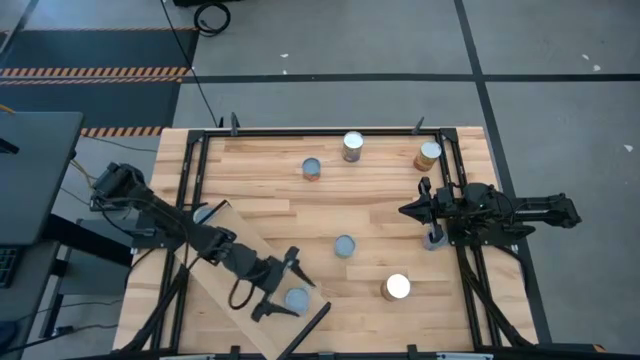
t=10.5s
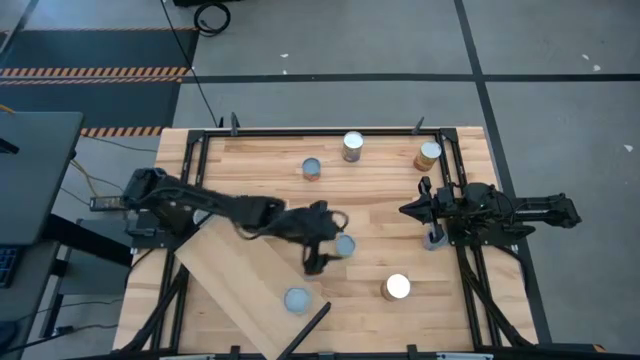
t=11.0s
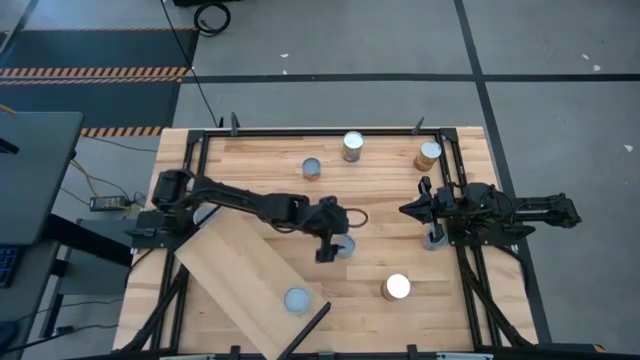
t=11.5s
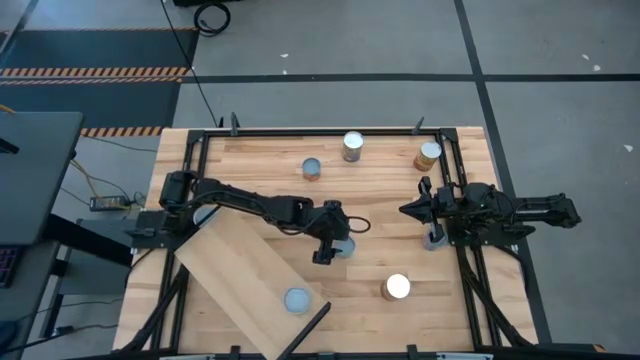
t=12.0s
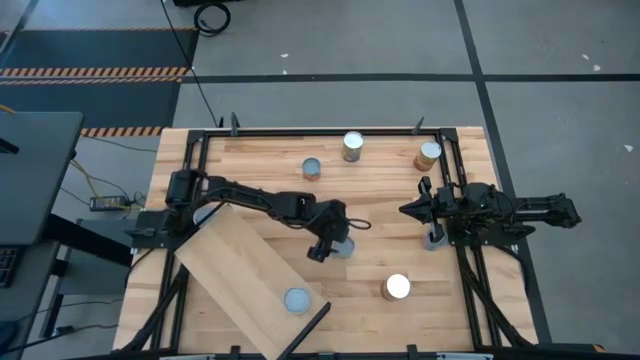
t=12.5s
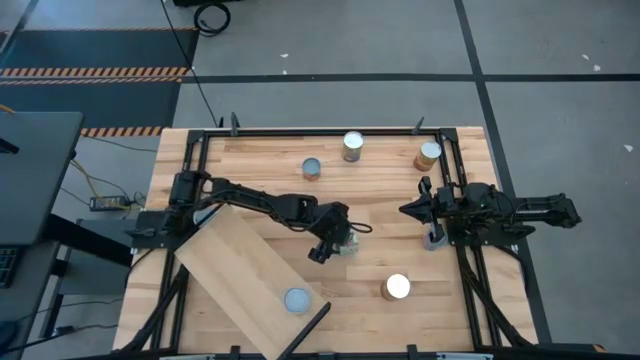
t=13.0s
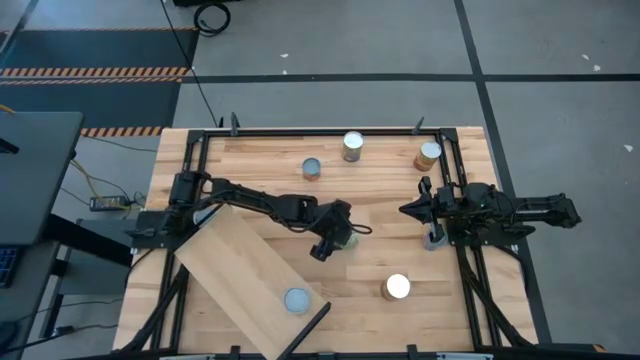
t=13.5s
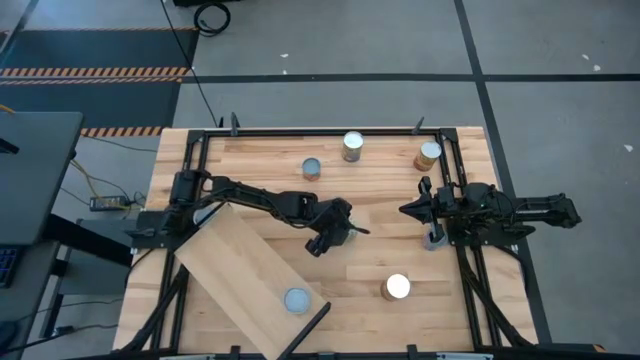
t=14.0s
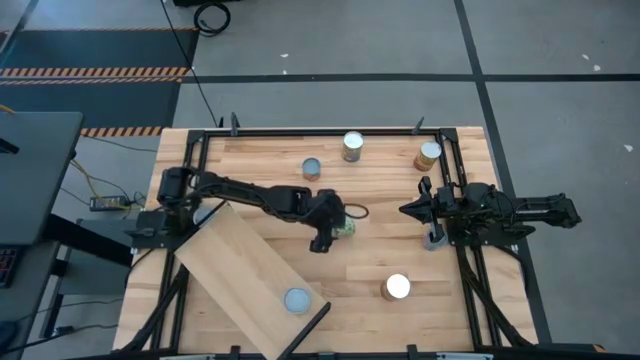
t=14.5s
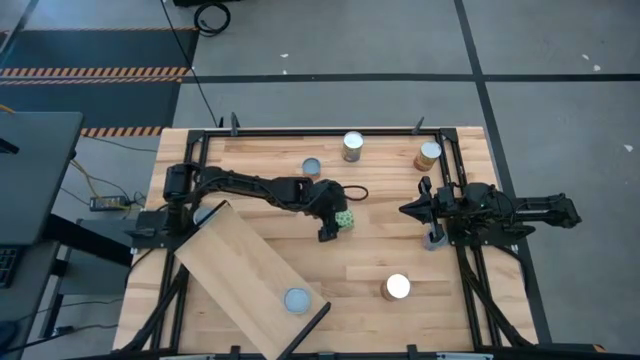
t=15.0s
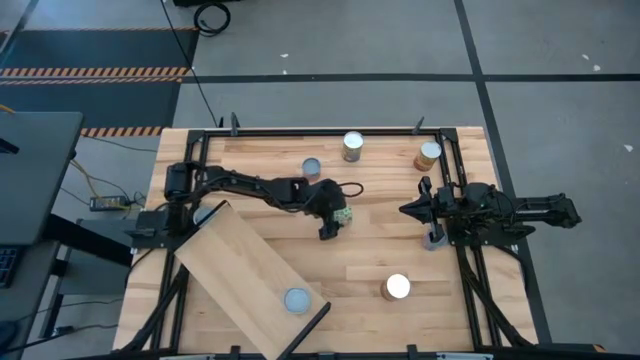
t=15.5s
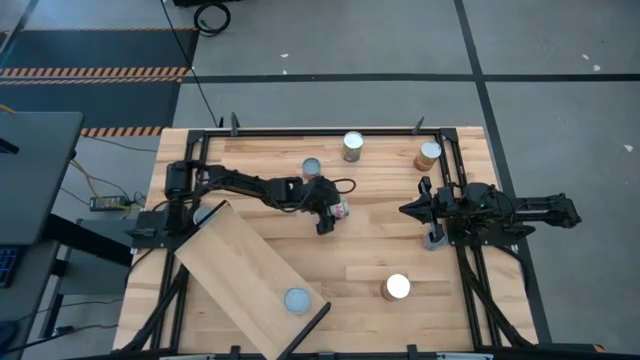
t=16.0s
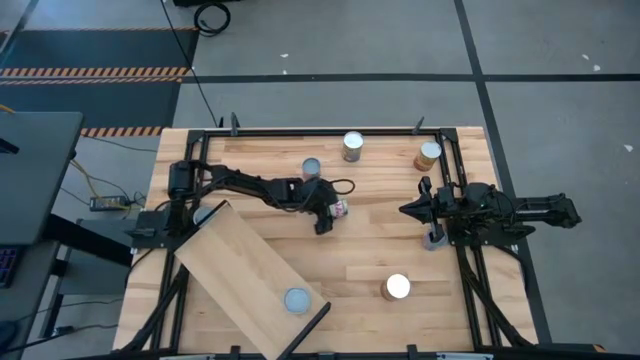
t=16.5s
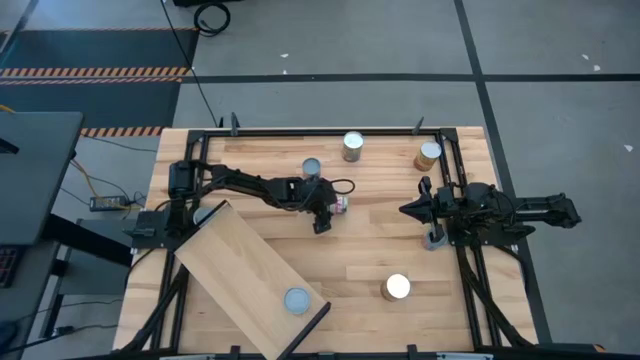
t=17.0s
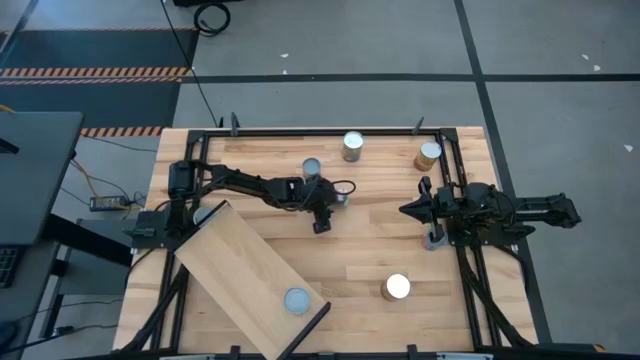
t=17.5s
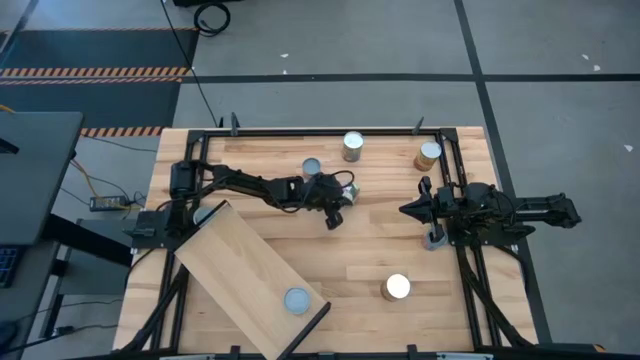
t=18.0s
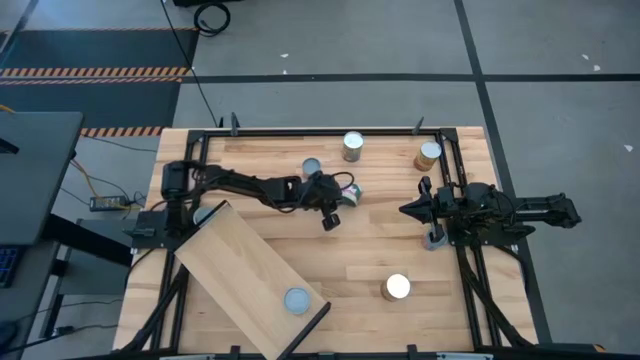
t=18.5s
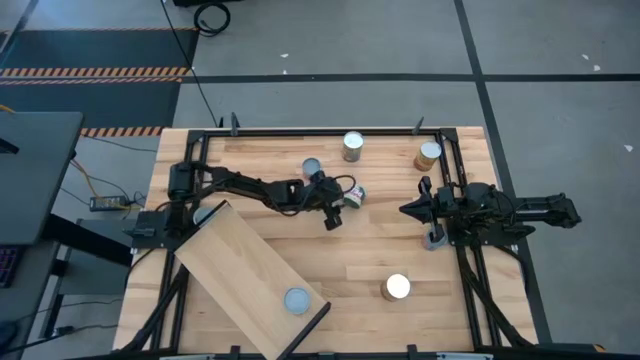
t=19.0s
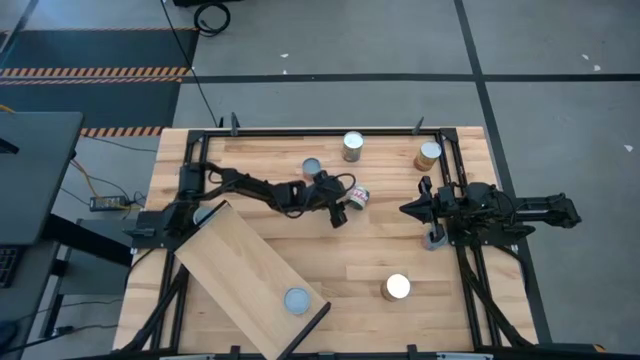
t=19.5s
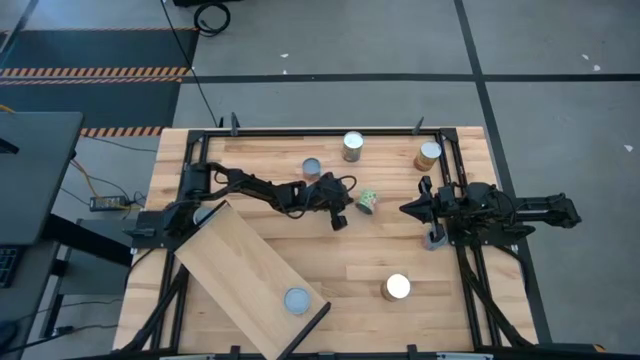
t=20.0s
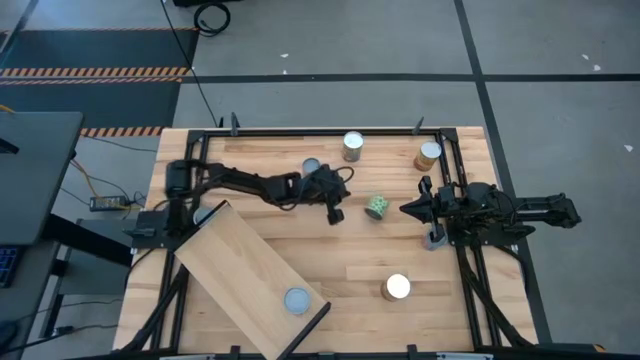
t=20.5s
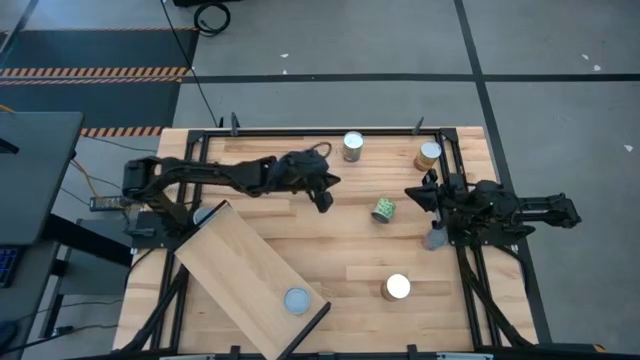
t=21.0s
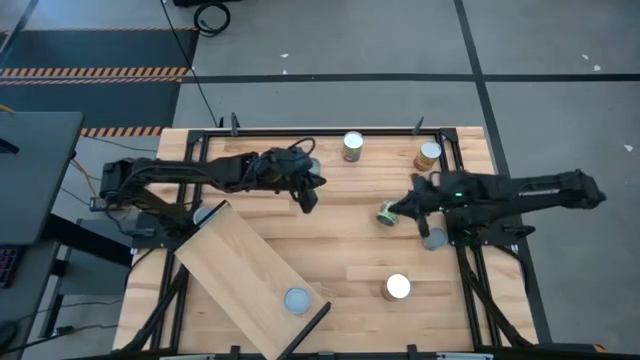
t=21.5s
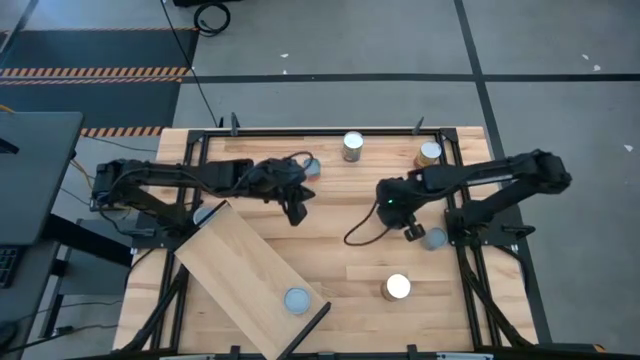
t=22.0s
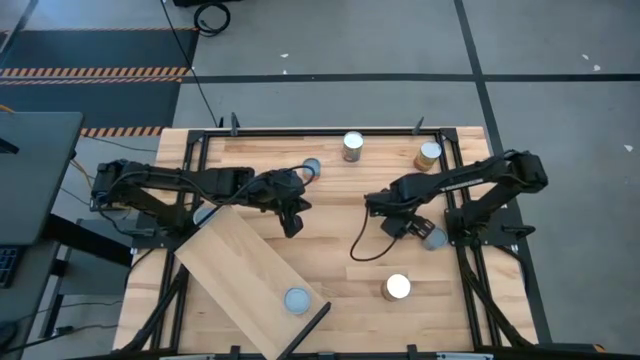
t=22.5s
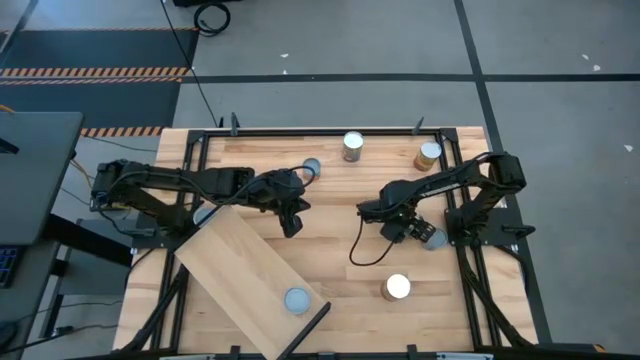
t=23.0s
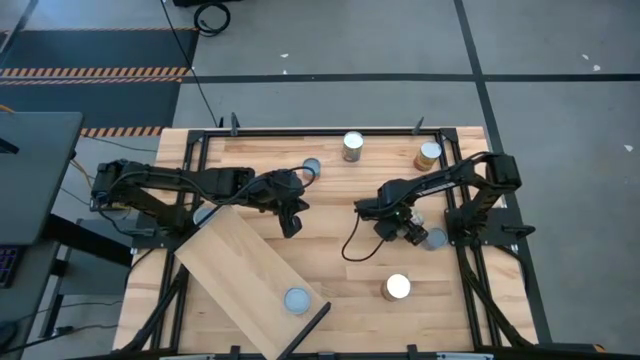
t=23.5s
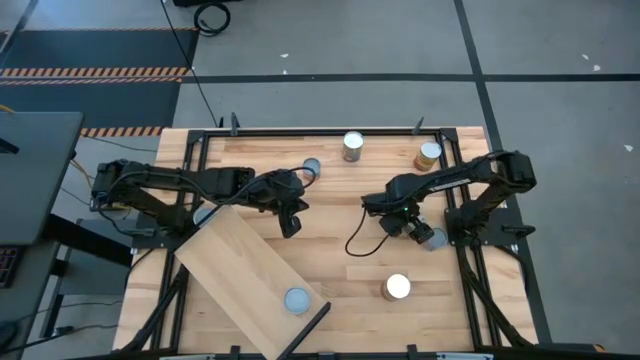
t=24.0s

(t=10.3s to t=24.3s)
Task: Pick and place cans onto a shelf
Put the canned peas on the shelf aligned with the other canned peas

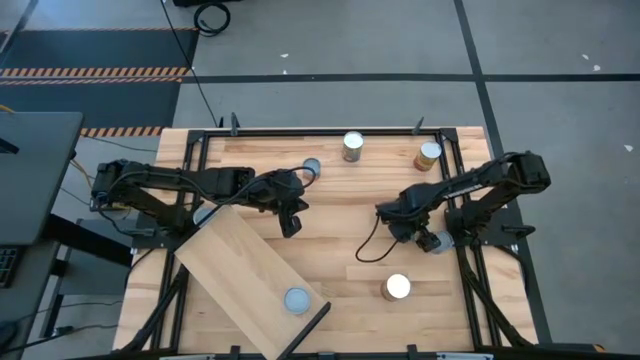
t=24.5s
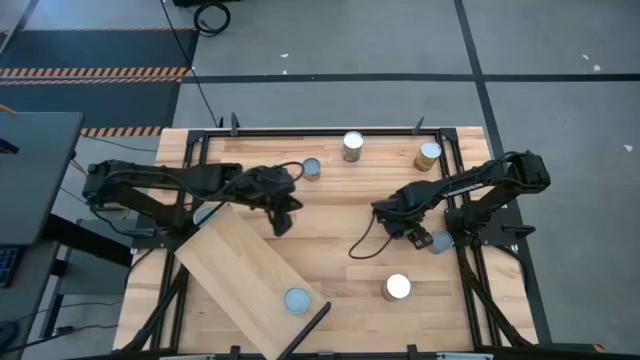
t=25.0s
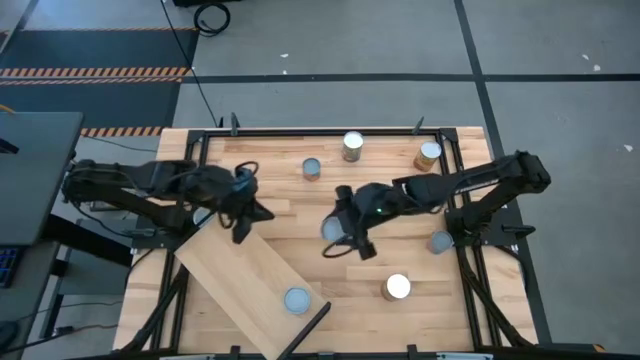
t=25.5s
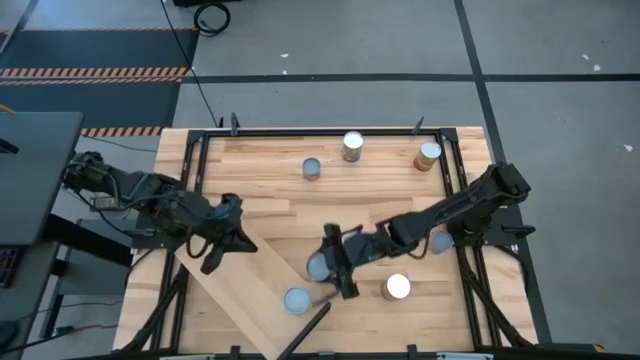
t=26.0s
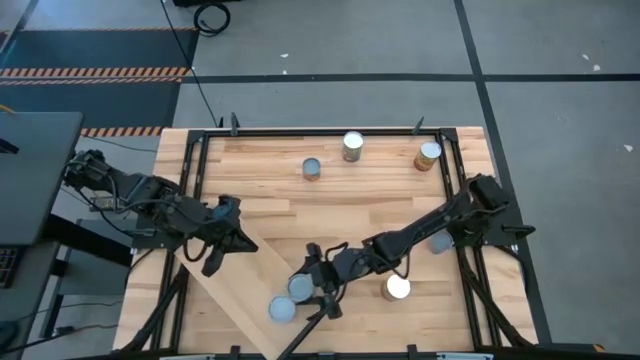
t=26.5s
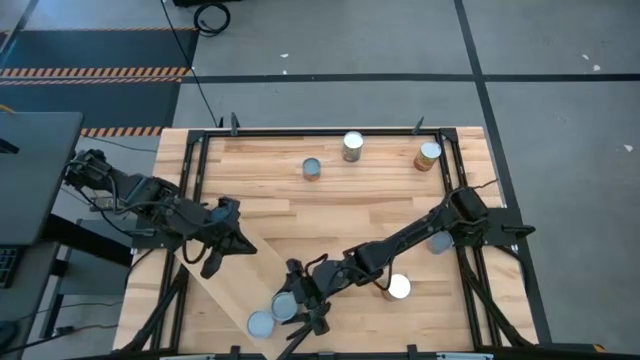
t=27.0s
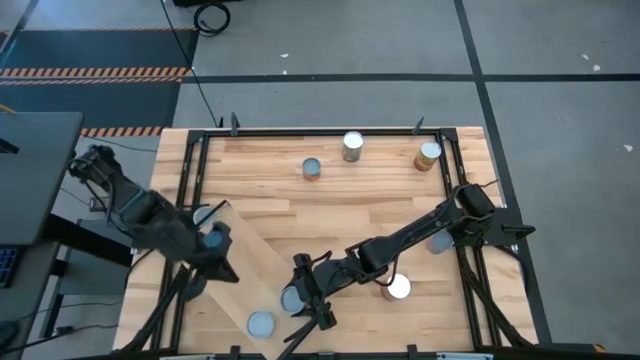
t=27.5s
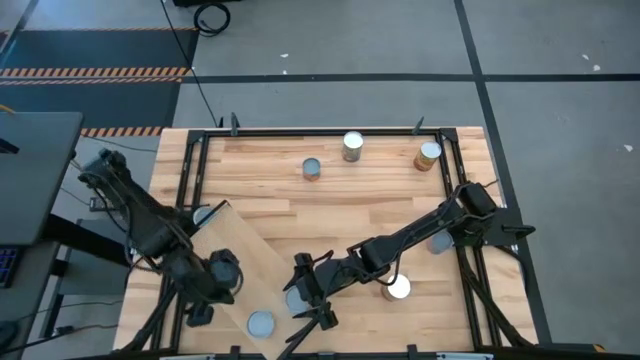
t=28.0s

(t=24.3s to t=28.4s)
Put the canned peas on the shelf aligned with the other canned peas
